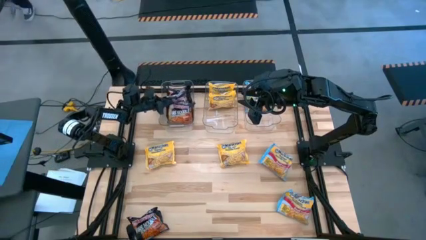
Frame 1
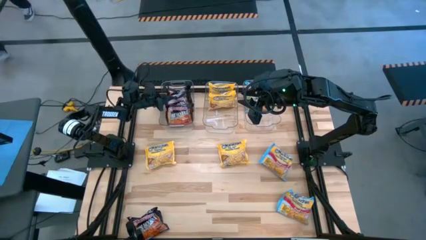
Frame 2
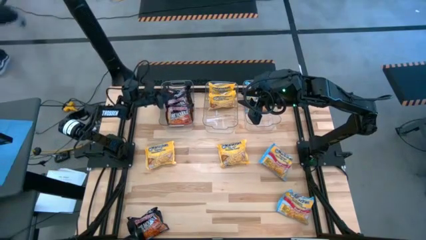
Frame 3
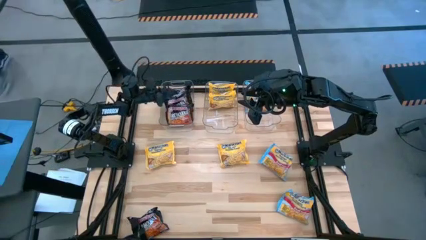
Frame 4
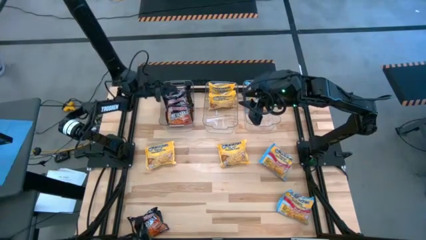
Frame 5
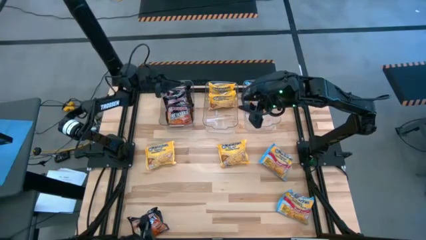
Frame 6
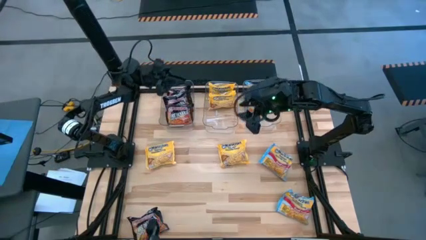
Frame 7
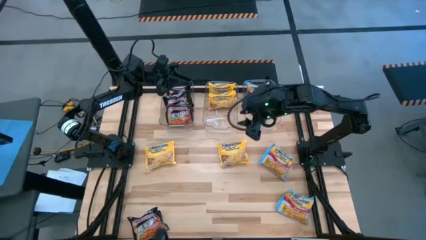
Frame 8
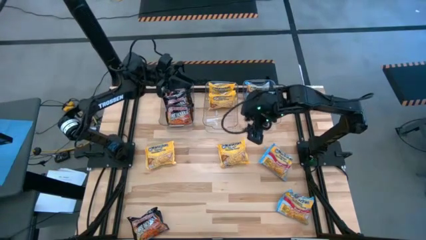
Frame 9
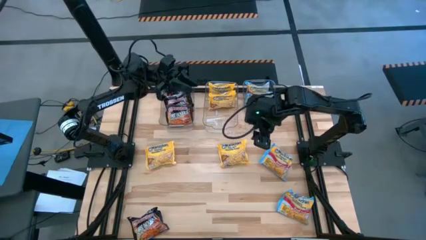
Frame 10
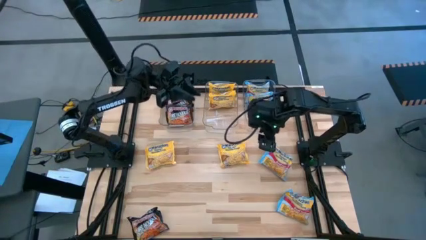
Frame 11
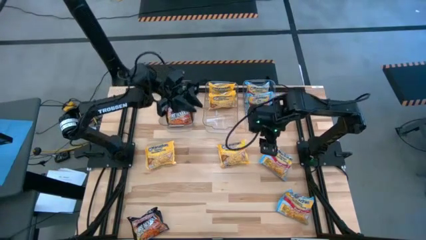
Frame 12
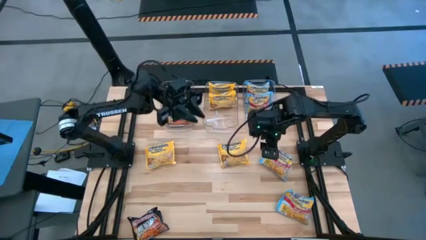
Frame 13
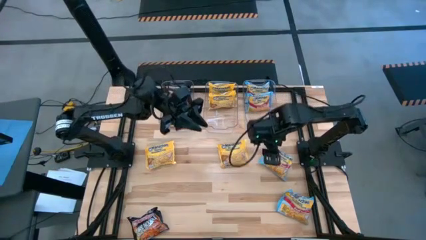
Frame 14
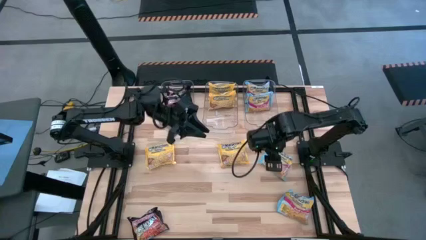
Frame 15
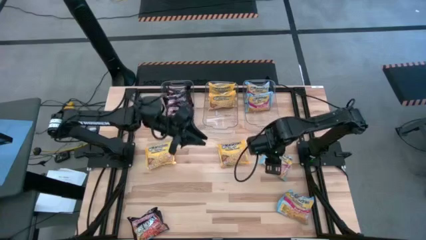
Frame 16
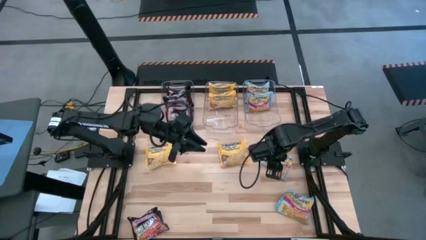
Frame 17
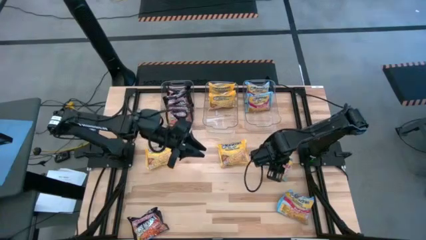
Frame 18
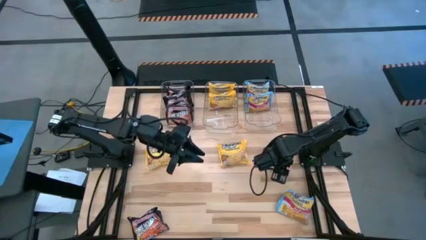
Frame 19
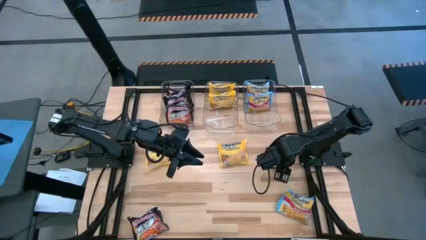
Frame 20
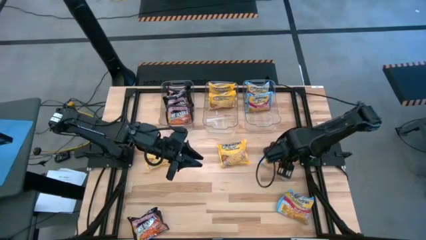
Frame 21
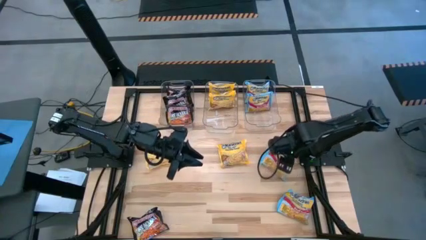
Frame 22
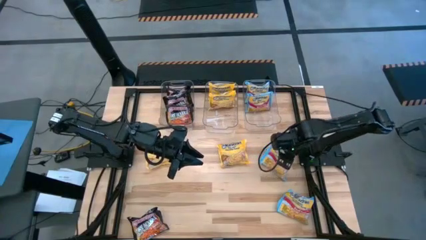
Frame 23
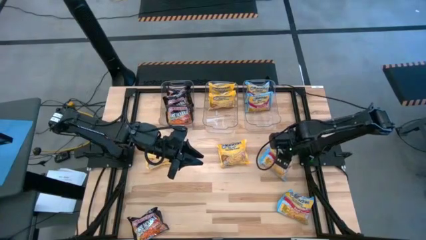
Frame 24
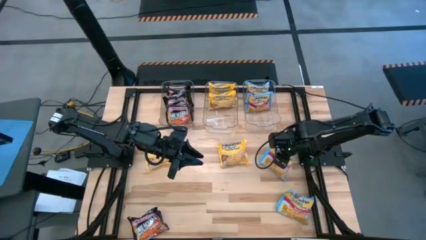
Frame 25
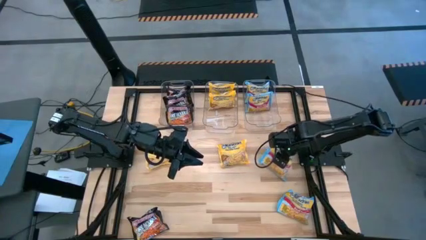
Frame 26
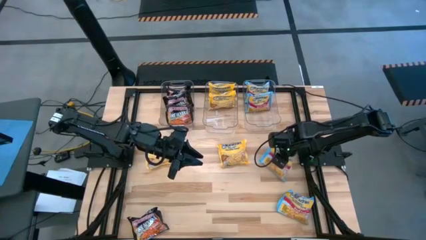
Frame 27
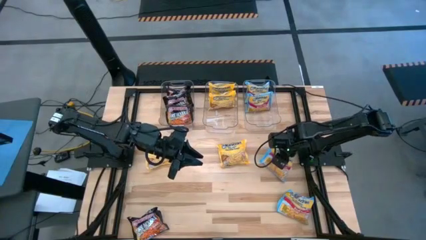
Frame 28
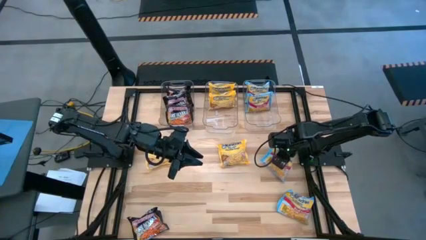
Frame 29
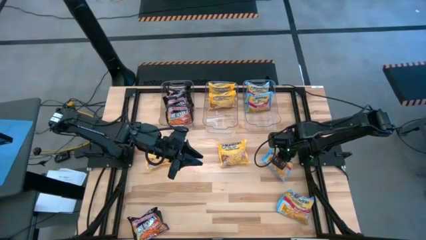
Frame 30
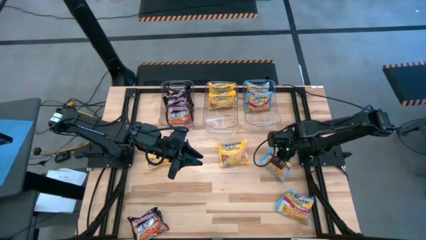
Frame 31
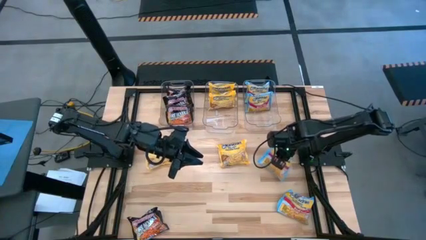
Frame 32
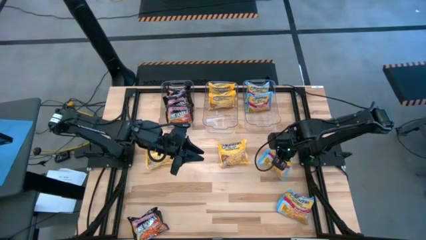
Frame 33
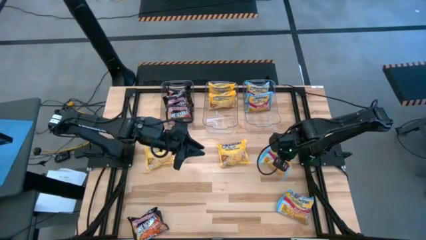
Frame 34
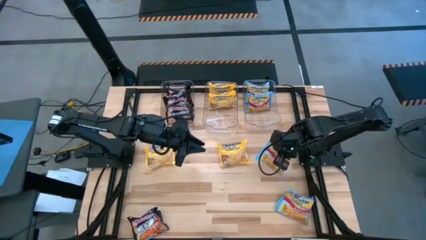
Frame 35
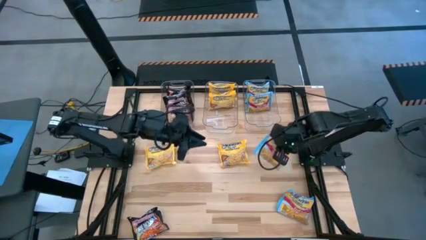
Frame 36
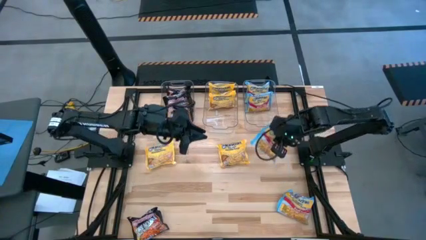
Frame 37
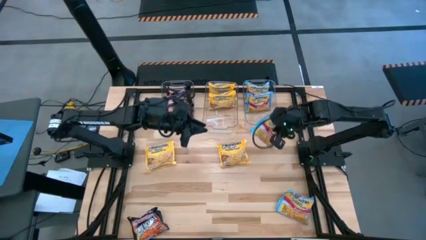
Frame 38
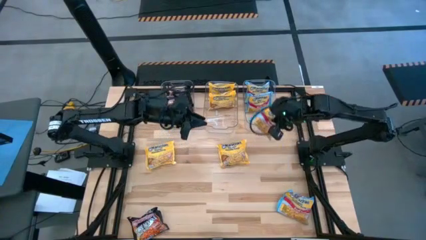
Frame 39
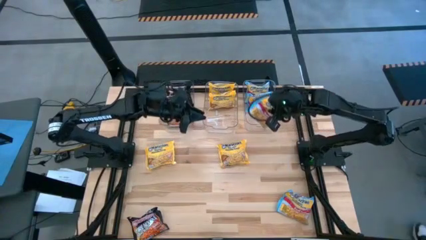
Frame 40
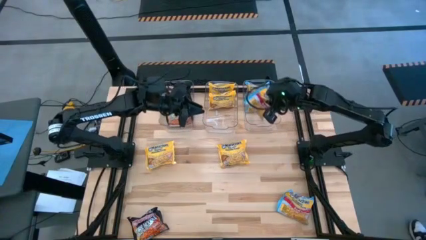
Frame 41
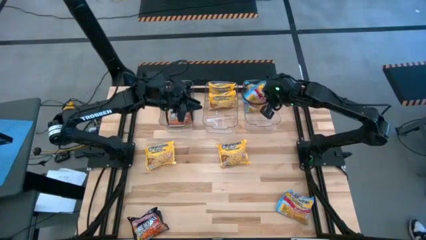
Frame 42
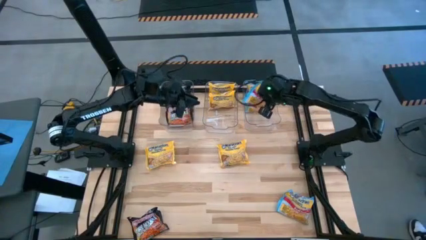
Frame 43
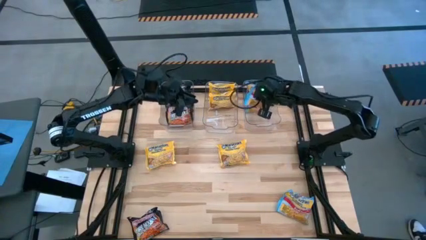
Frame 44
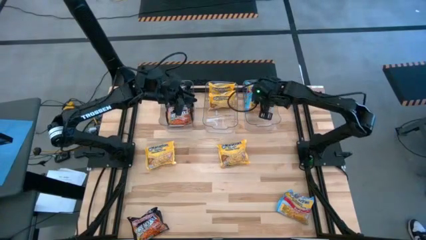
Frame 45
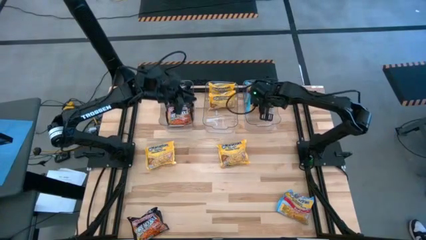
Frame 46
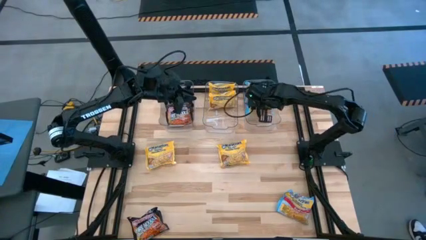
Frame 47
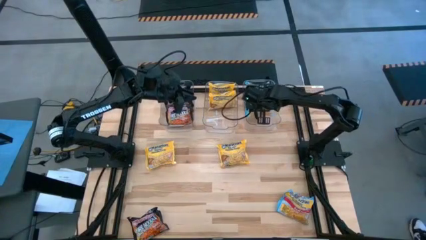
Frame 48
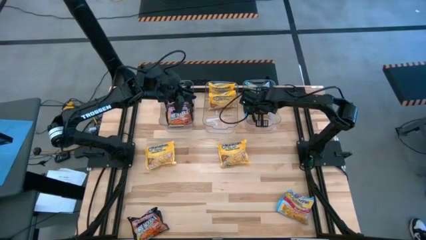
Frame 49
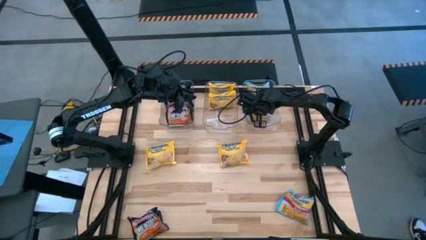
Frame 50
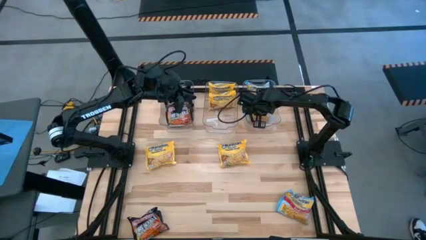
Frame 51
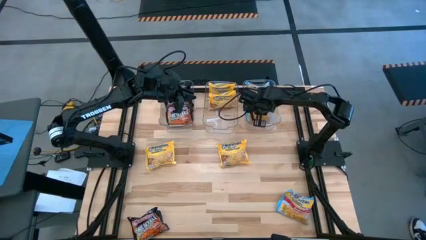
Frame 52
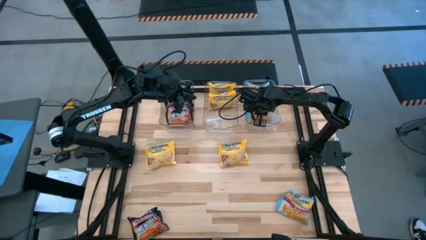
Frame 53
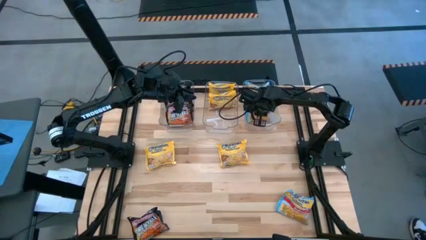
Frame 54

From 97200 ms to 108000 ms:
Task: Sort Maruchan noodles
Put the blue noodle pack into the right transparent bin

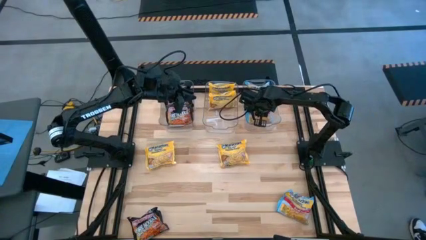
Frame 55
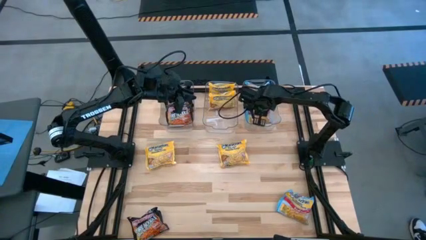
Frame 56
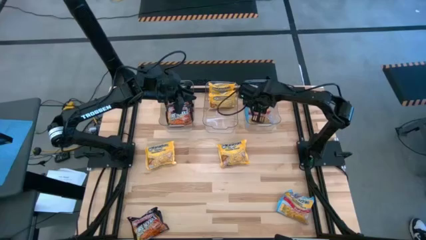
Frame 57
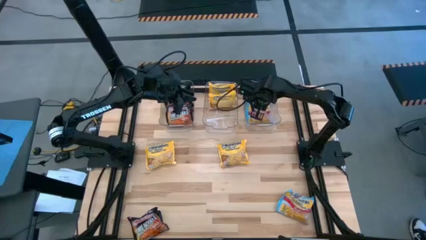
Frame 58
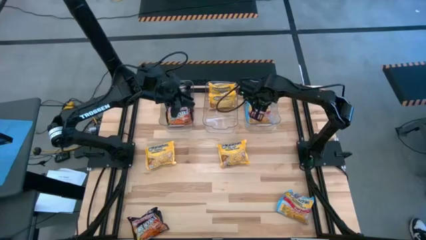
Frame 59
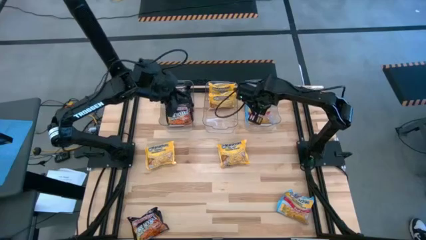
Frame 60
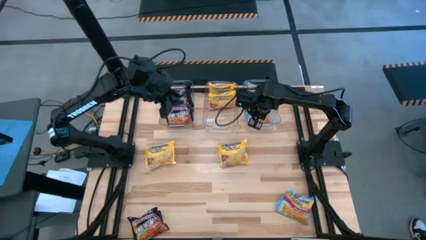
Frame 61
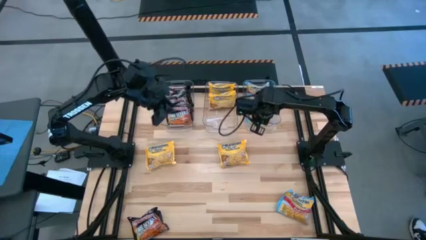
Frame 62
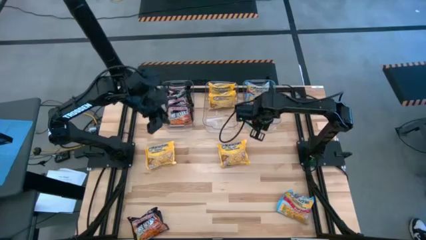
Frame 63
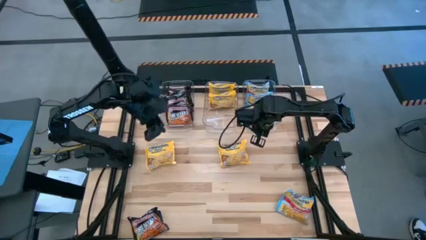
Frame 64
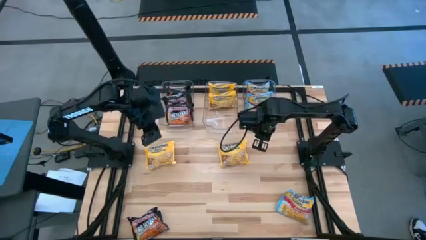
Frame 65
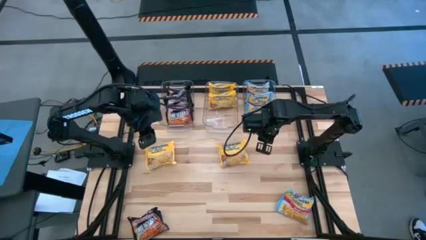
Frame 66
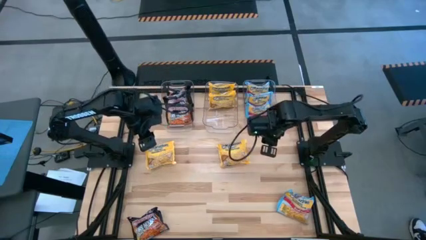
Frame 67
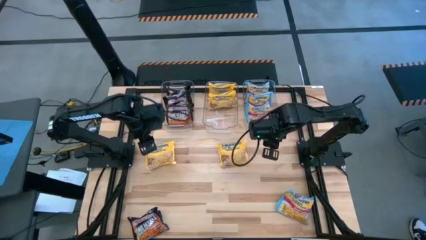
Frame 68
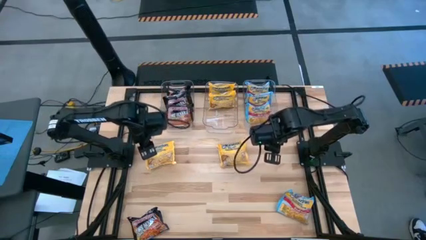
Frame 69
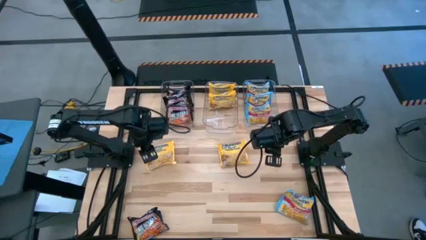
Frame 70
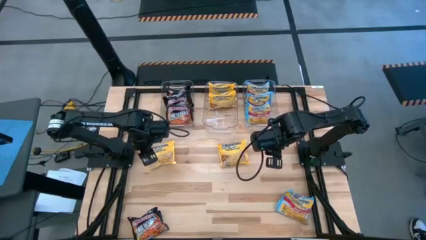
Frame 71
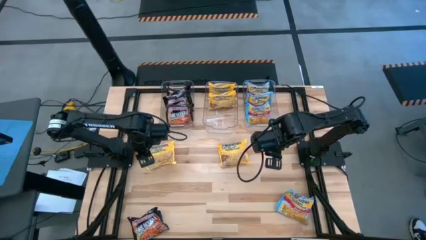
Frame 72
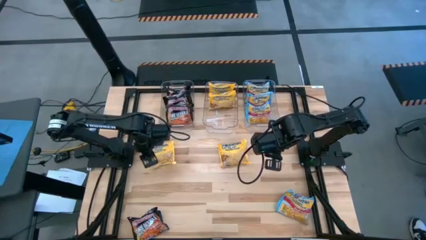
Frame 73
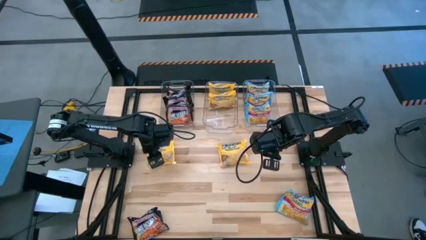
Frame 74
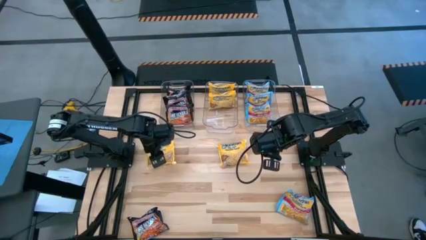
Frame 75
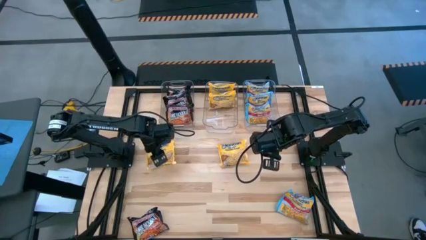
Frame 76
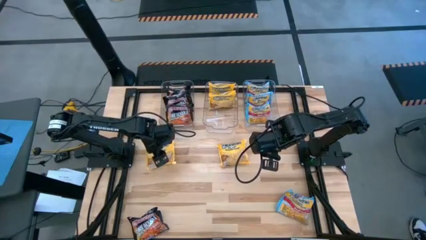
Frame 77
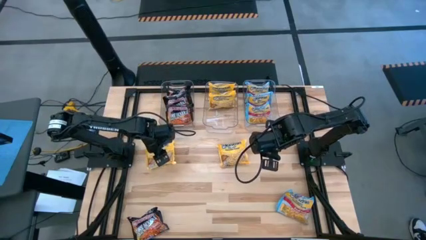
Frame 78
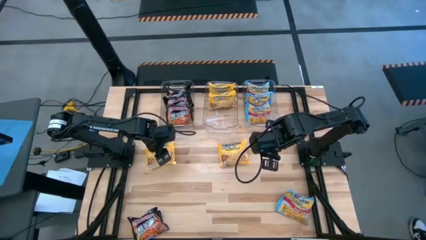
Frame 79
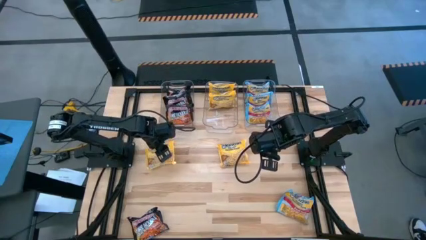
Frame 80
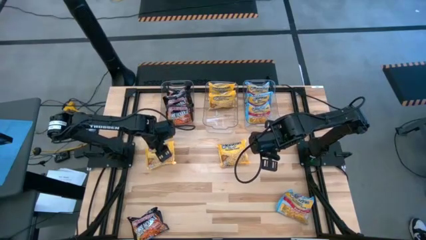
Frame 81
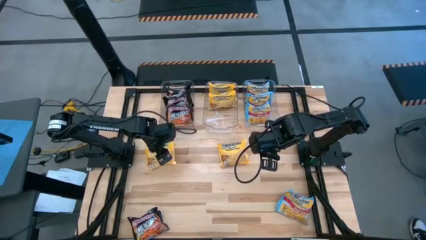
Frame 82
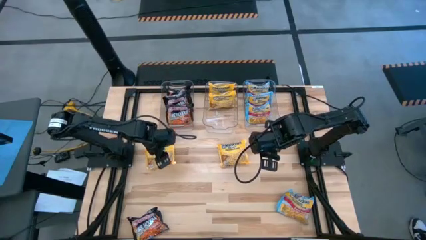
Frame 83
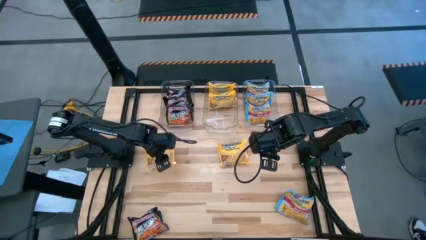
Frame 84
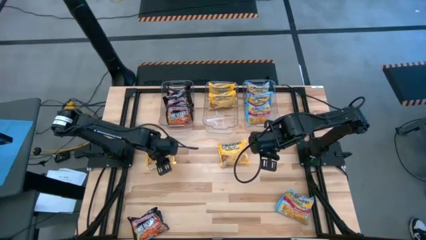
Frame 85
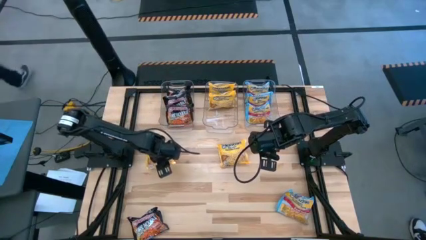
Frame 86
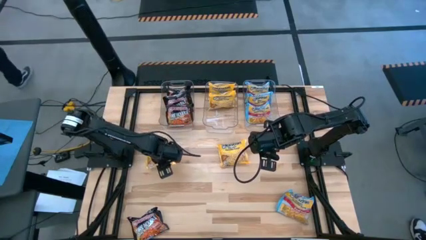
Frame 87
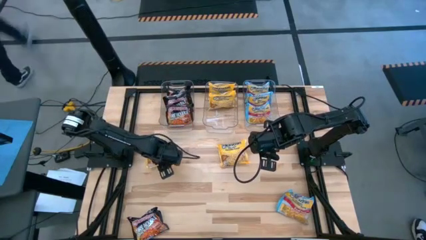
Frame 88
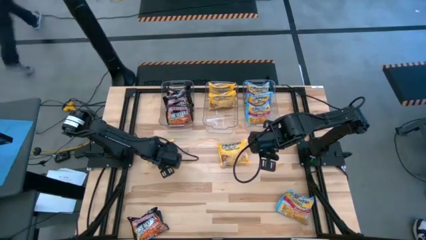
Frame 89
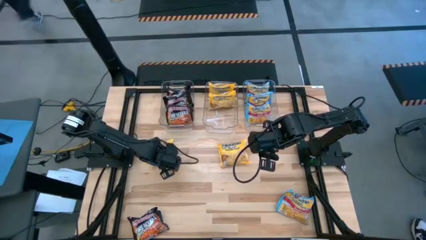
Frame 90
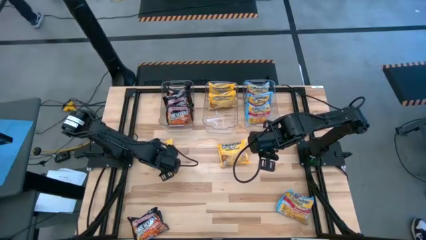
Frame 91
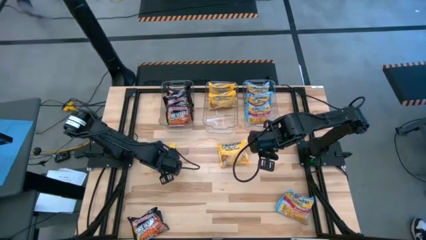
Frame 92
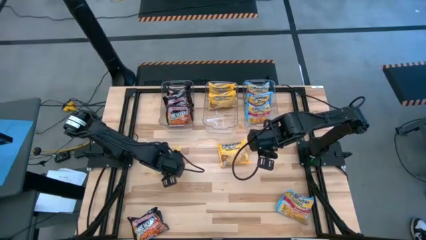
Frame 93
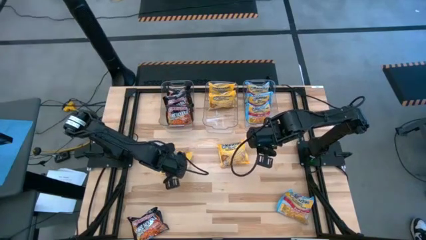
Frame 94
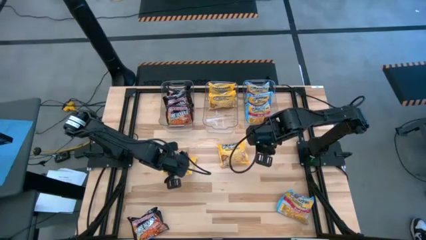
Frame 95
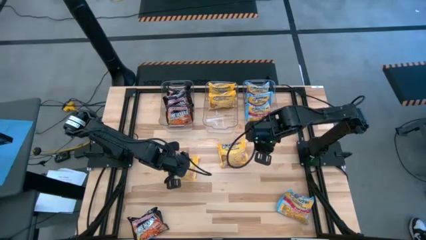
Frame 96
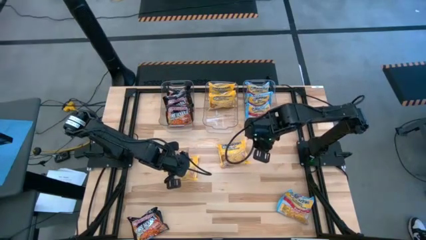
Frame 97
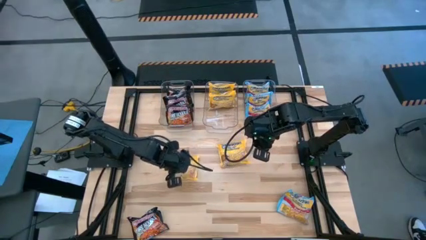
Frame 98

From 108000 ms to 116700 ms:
Put the yellow noodle pack into the middle transparent bin
